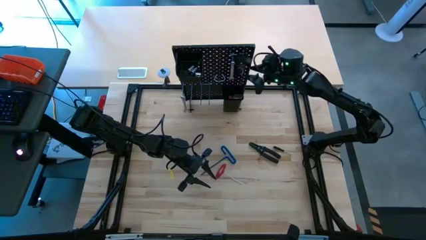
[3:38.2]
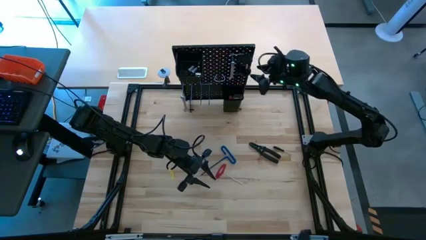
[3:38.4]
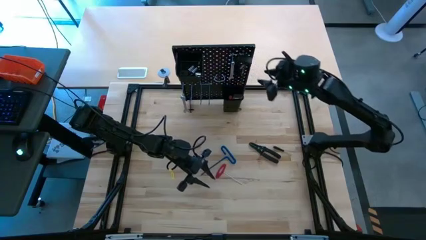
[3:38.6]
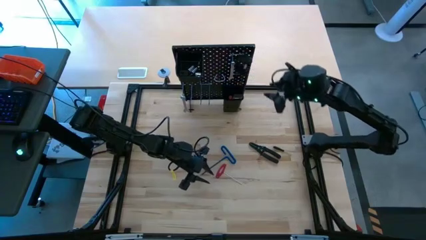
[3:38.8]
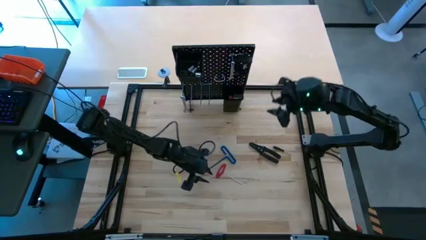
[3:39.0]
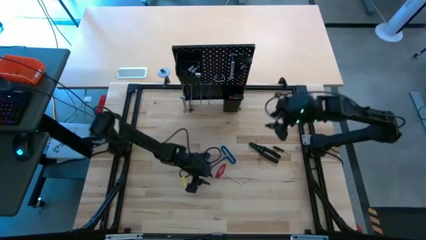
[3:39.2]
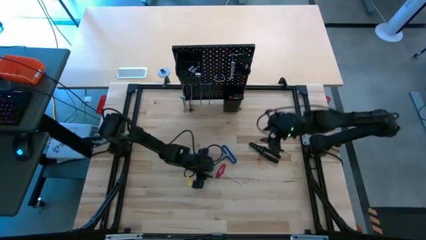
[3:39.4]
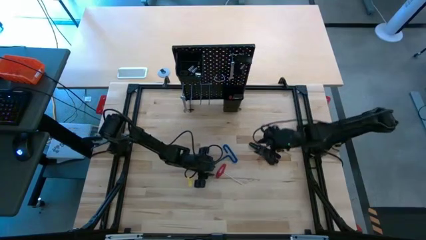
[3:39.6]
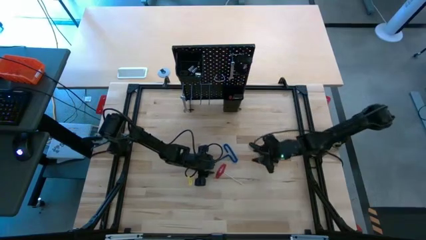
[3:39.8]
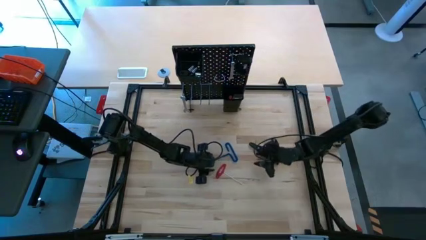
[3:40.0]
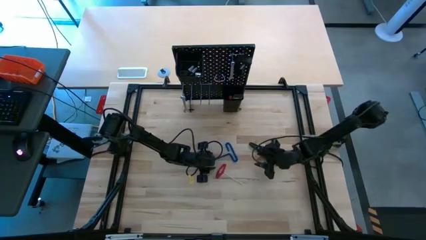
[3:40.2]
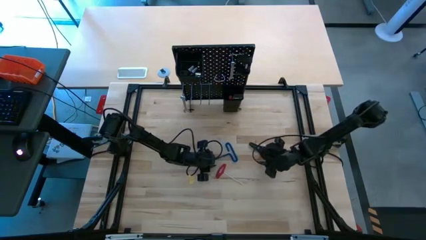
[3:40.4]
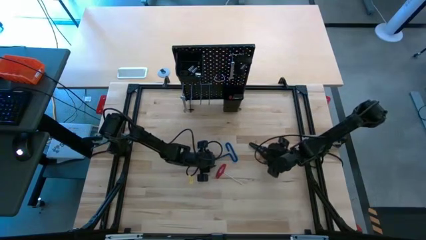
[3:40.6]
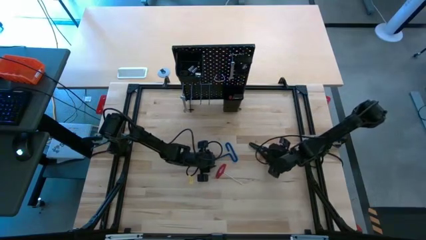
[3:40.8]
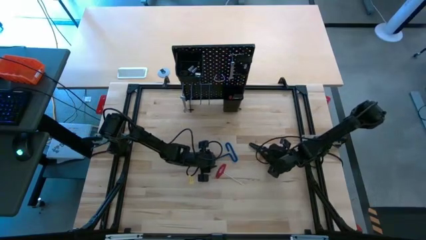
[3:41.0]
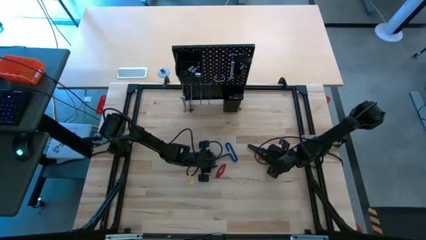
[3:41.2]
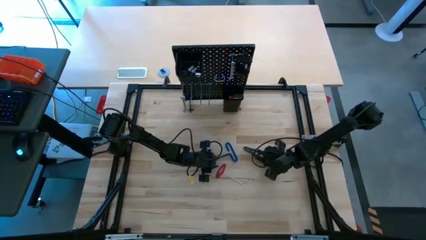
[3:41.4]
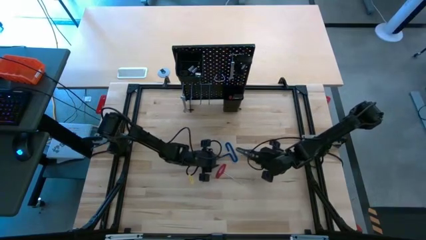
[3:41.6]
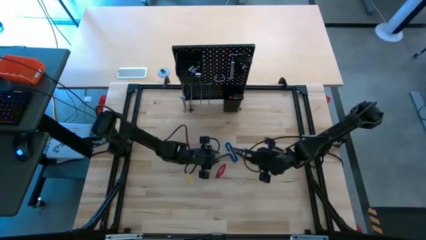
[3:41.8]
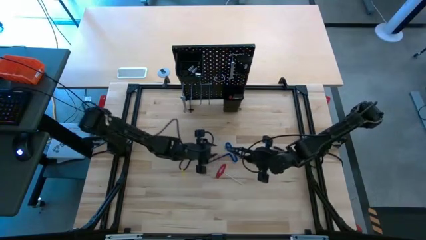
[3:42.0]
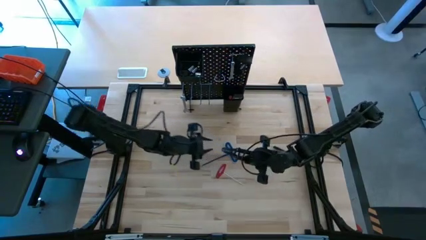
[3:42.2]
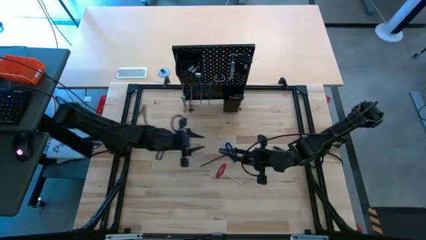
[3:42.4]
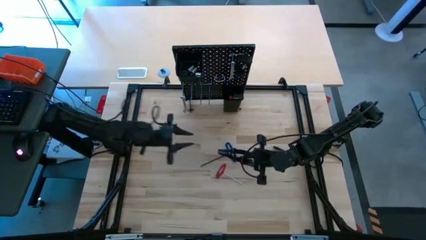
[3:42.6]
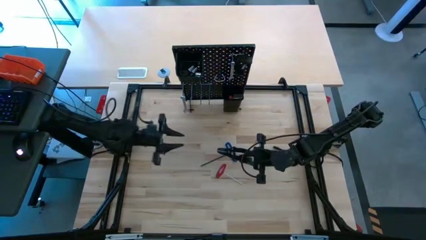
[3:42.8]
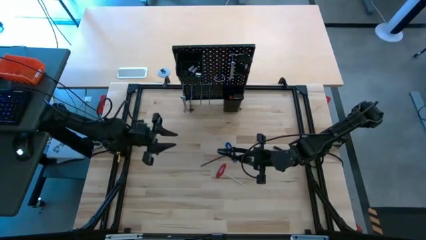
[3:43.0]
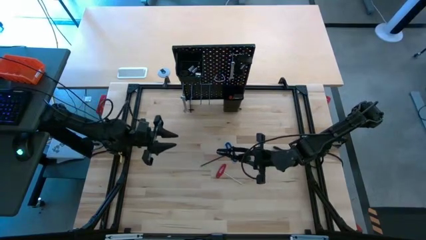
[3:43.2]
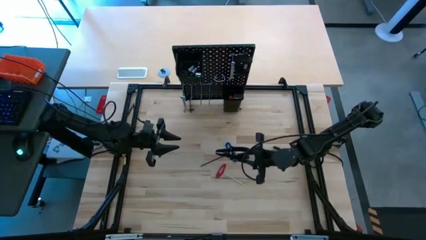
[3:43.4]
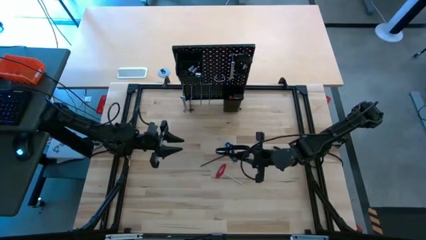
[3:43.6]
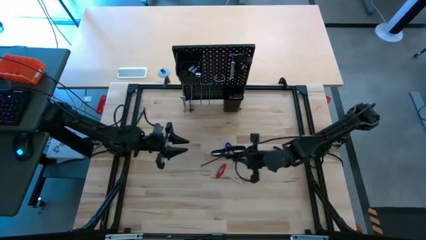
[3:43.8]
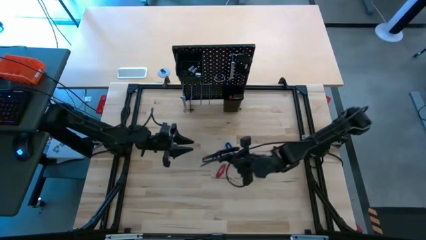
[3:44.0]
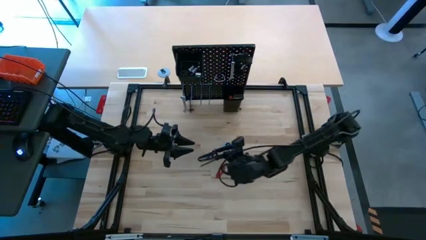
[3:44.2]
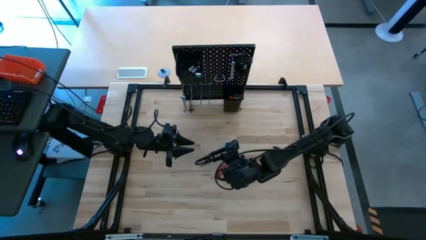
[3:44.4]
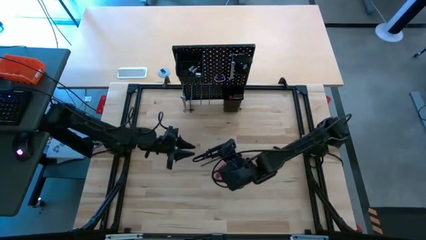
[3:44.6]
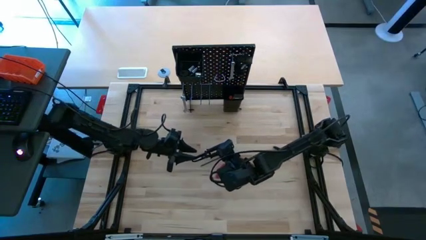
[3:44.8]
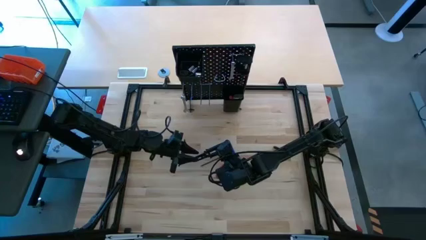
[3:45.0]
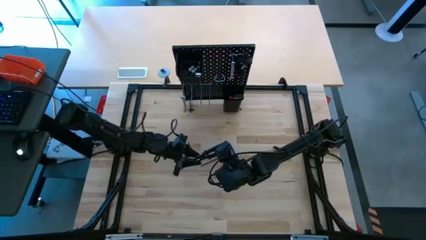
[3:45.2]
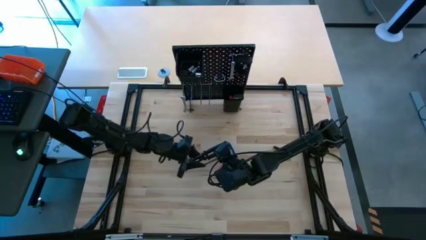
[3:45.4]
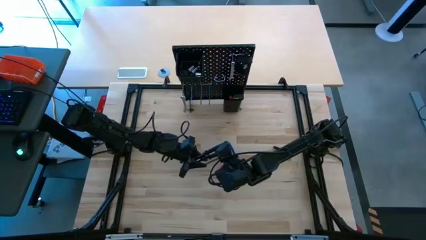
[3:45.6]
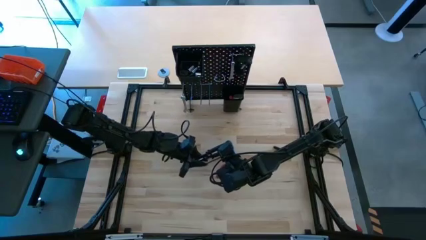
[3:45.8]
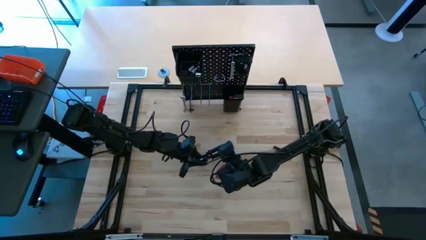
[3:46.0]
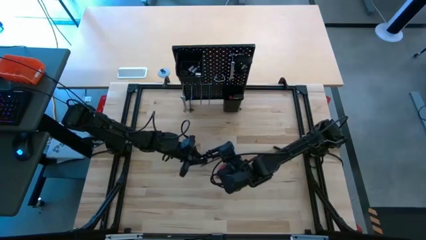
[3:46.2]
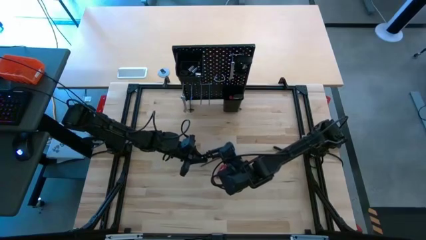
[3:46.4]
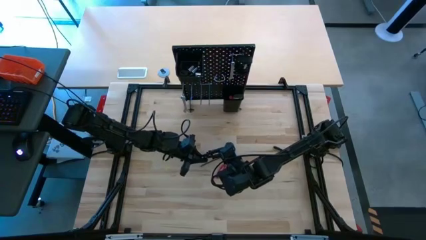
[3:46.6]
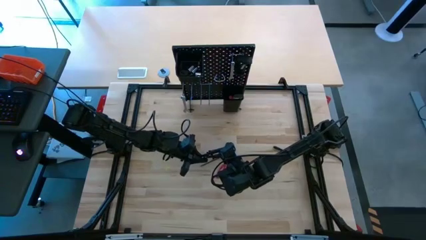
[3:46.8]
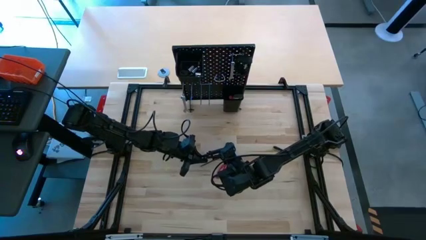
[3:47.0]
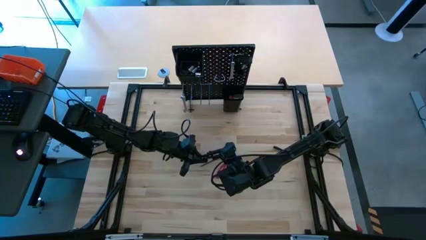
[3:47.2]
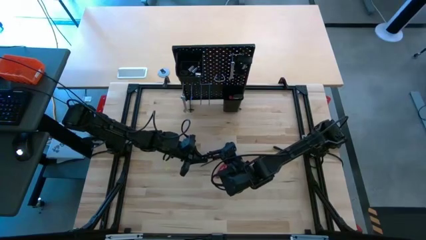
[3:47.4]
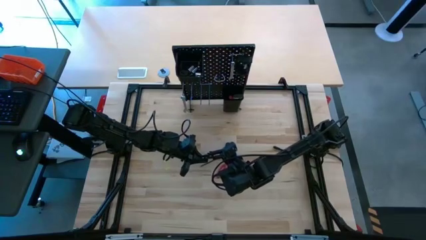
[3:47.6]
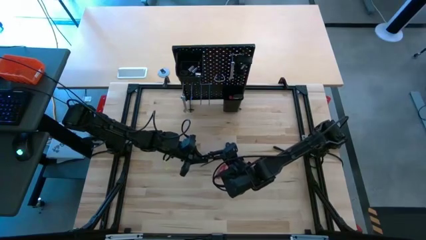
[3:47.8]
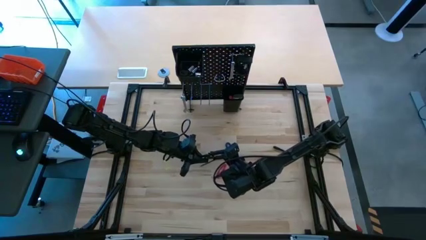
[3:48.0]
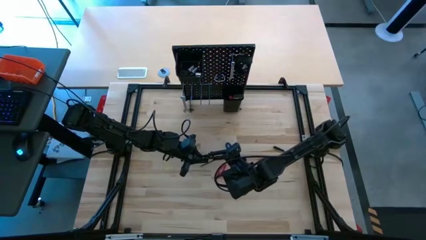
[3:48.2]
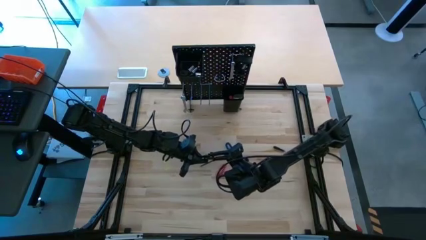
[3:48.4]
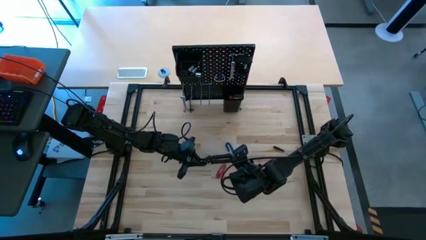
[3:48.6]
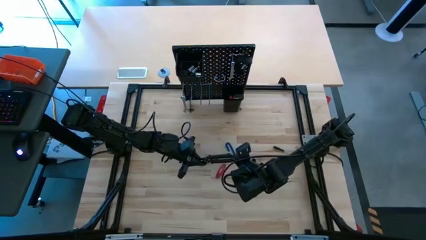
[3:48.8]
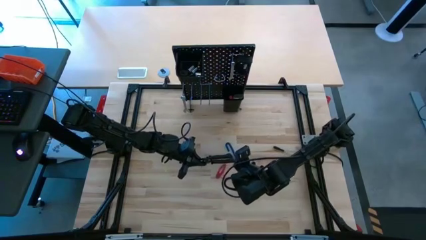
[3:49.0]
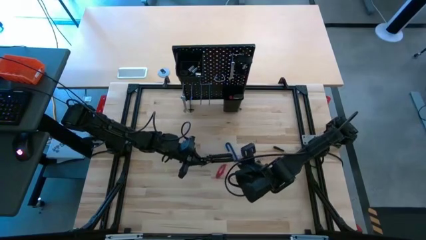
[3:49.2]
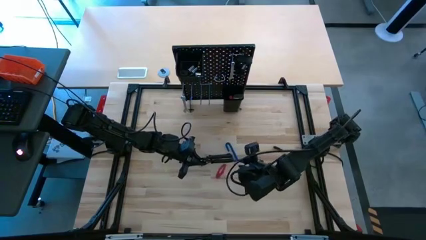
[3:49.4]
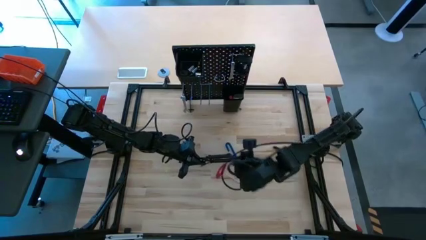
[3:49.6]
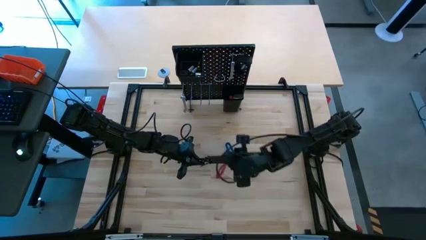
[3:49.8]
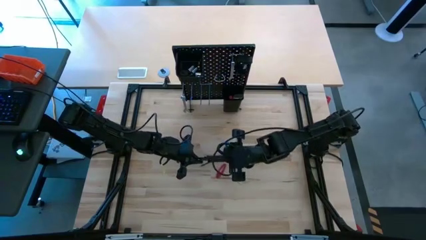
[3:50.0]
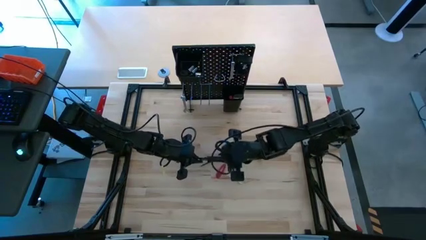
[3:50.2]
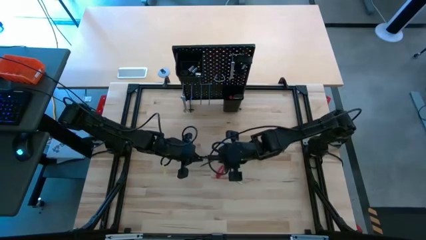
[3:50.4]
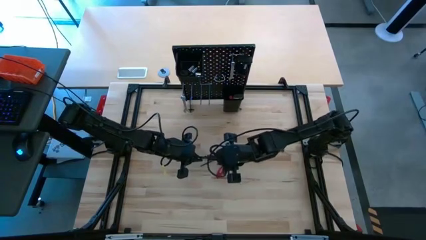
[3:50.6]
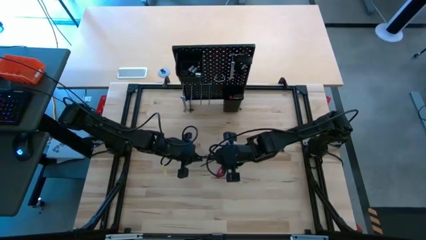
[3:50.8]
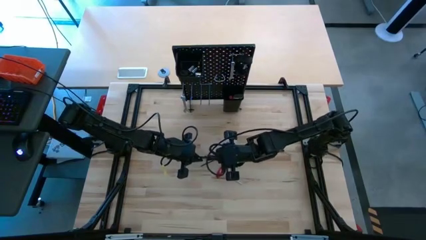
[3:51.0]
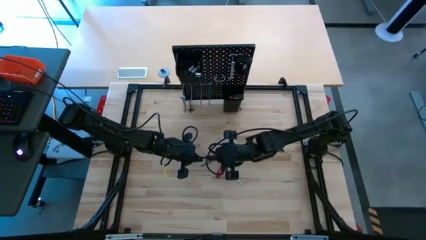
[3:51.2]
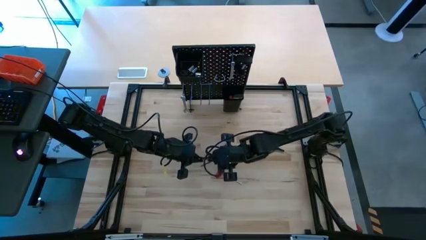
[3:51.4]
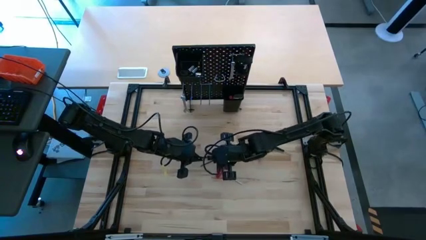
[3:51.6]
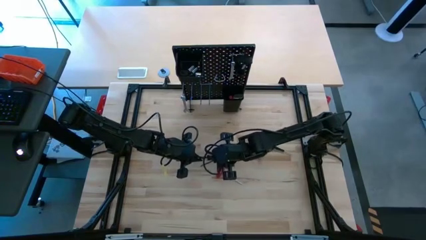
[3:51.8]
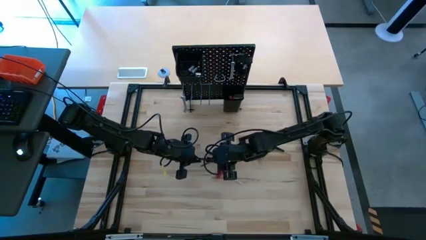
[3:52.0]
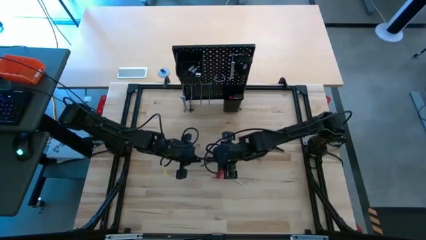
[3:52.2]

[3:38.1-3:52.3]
Task: Hang tools onto peg board
Hang the wire stripper on the pegboard
